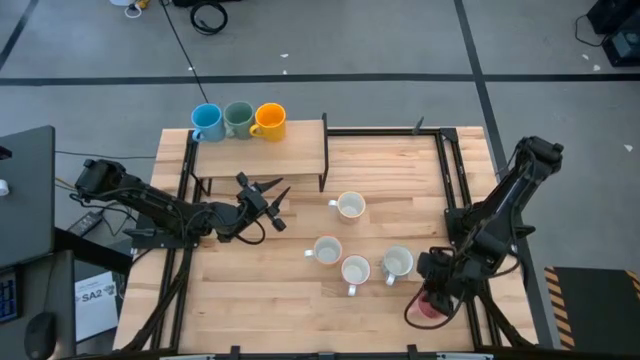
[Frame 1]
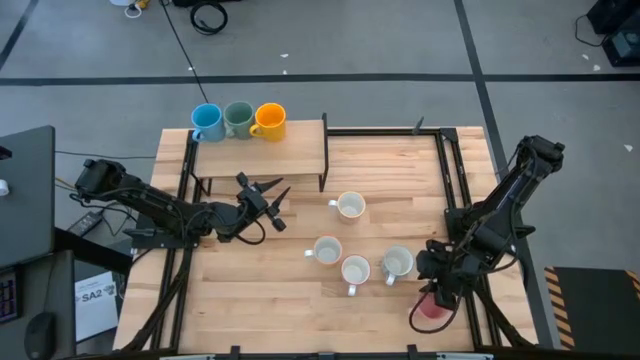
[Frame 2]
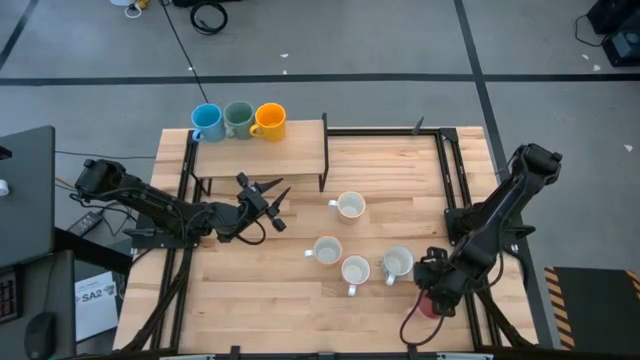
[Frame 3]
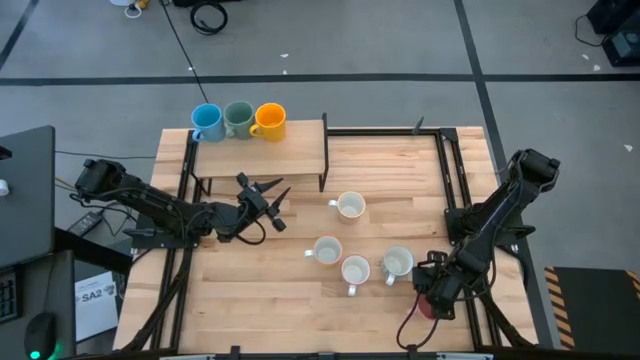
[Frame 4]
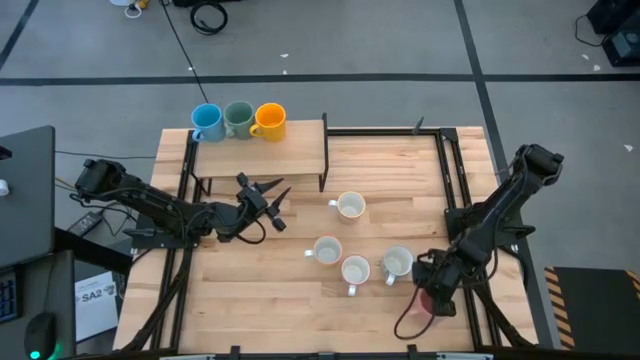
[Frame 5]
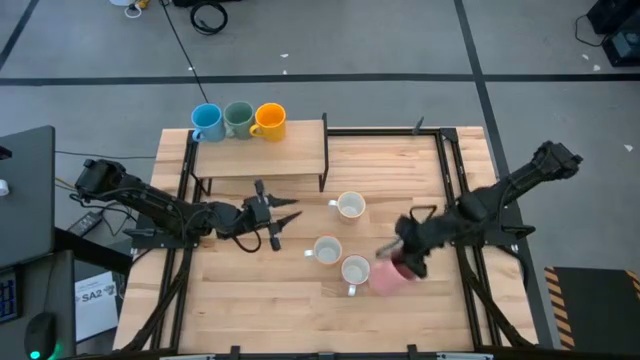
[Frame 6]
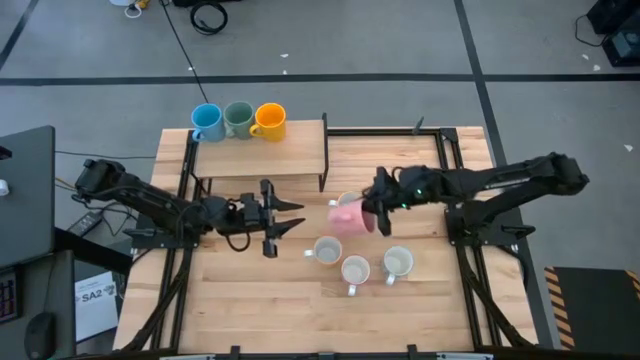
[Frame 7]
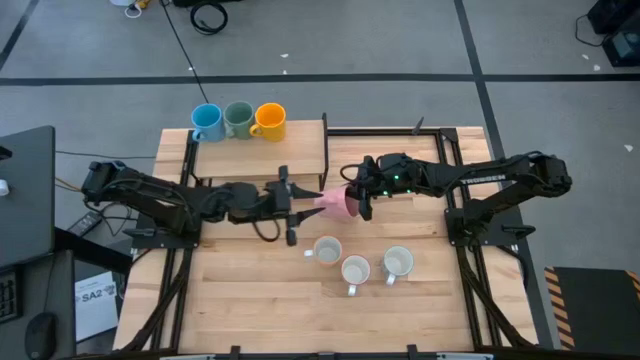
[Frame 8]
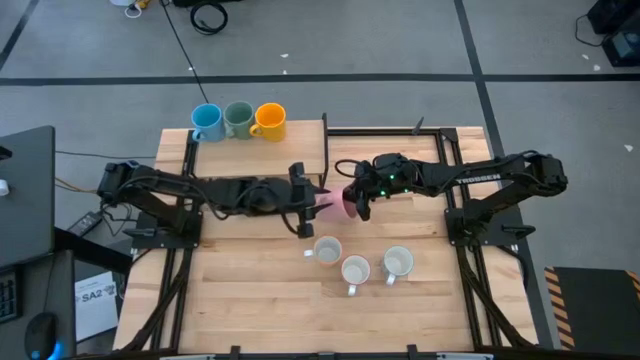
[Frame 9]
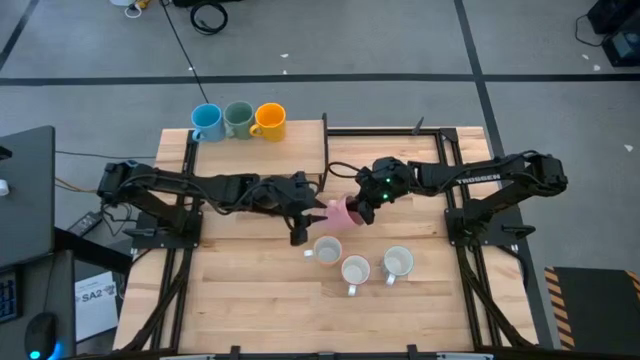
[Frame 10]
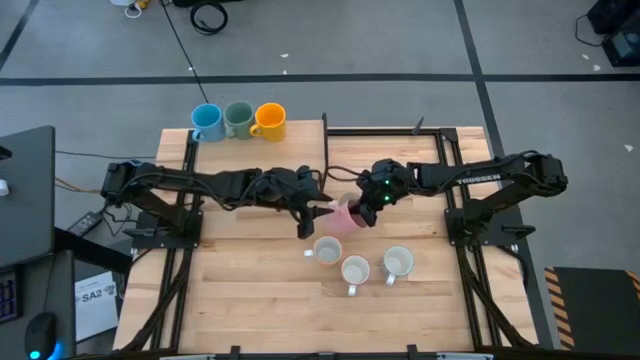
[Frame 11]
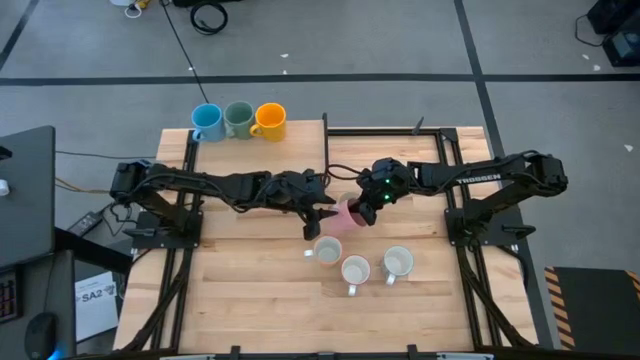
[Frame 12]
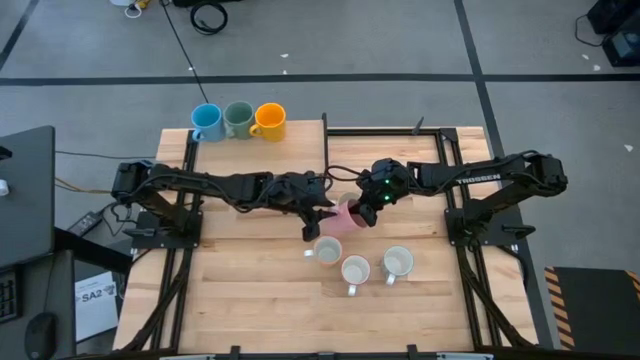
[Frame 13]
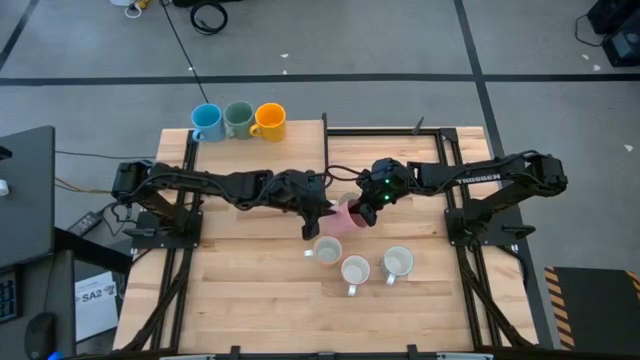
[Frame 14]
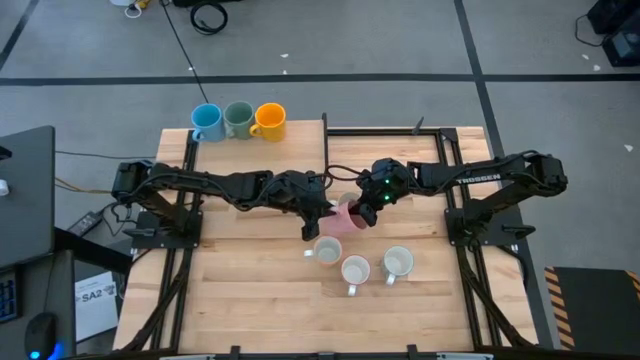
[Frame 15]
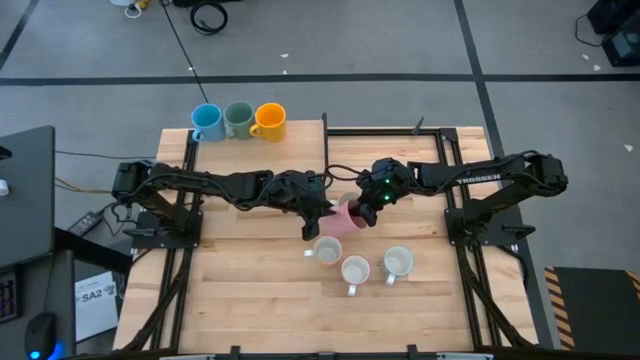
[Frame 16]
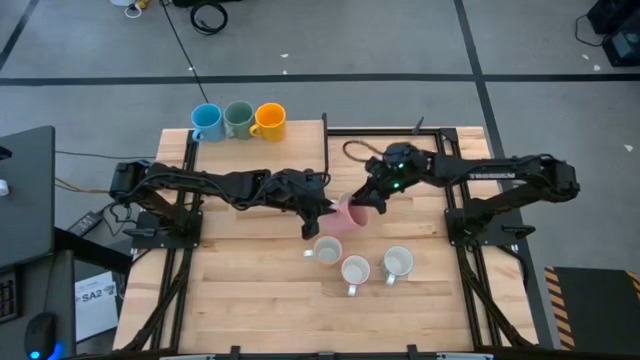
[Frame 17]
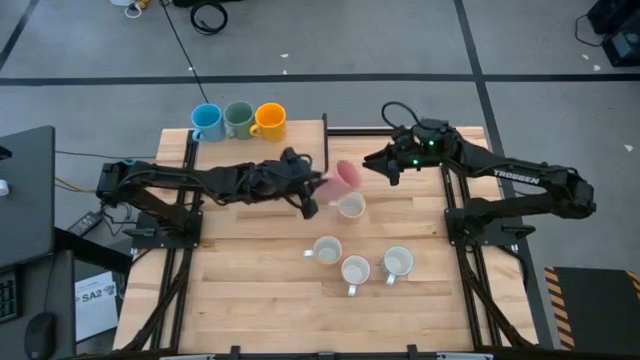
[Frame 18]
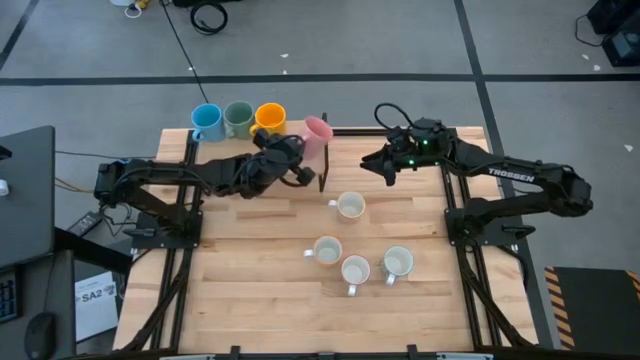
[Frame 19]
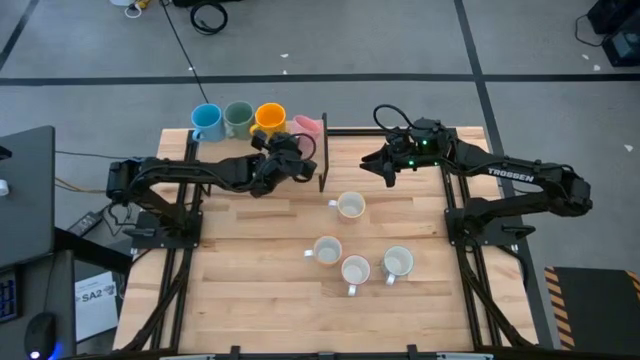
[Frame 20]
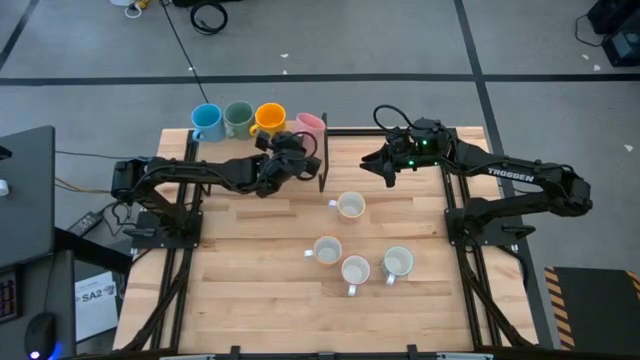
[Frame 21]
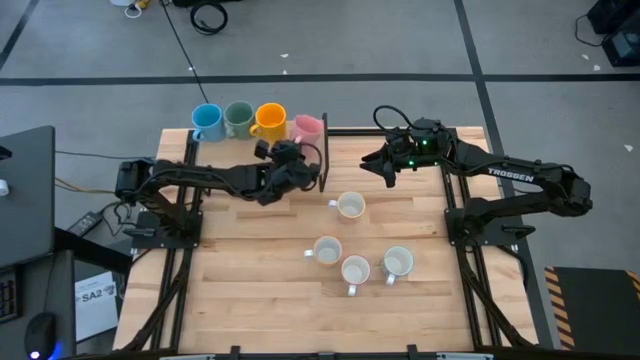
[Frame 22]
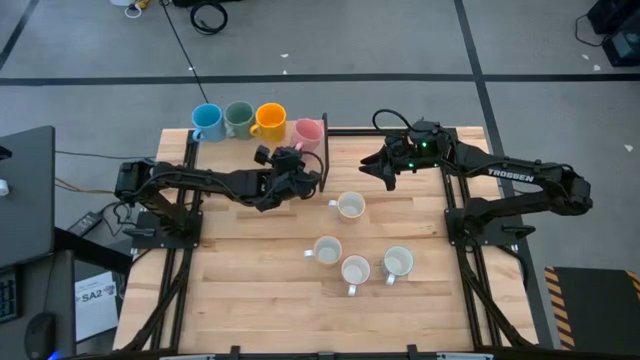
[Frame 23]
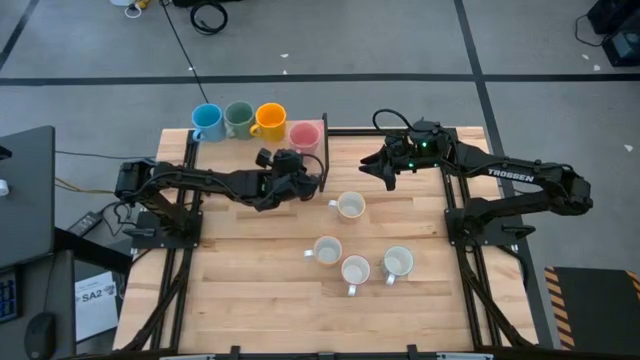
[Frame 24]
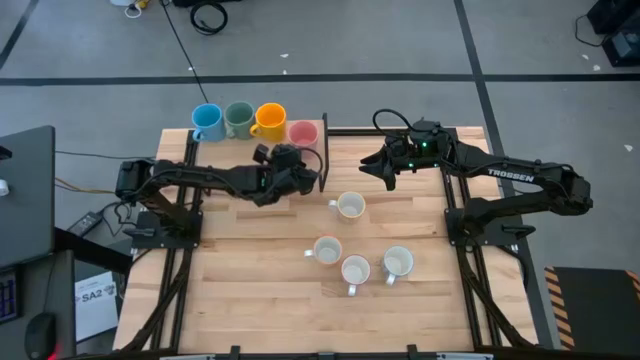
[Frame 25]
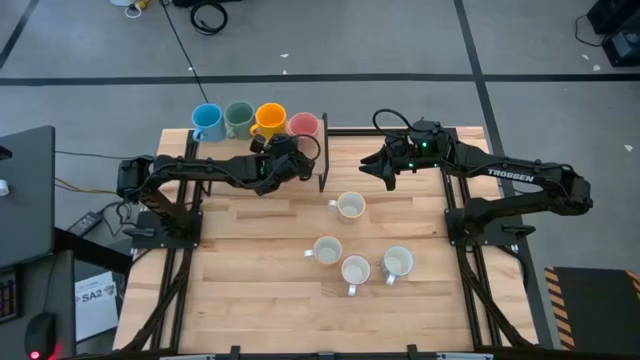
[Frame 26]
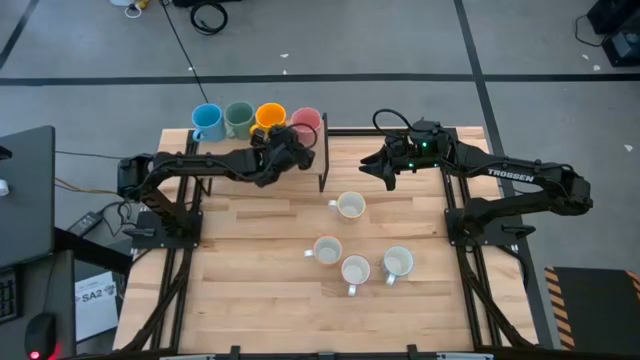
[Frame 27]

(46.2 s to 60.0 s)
Task: Place coffee mugs
Put the pink mug on the shelf

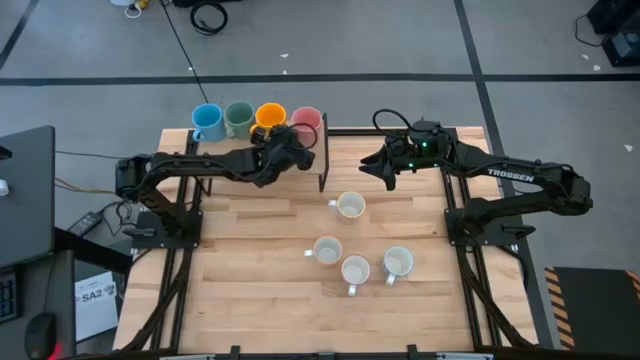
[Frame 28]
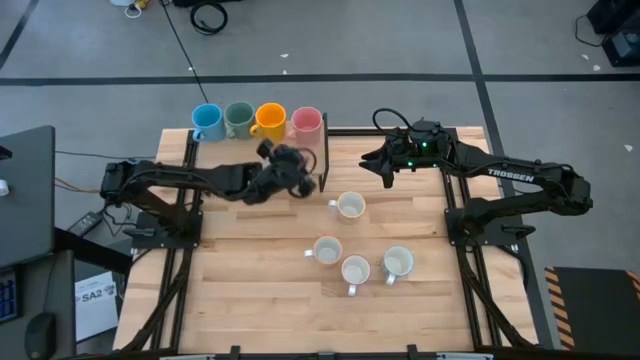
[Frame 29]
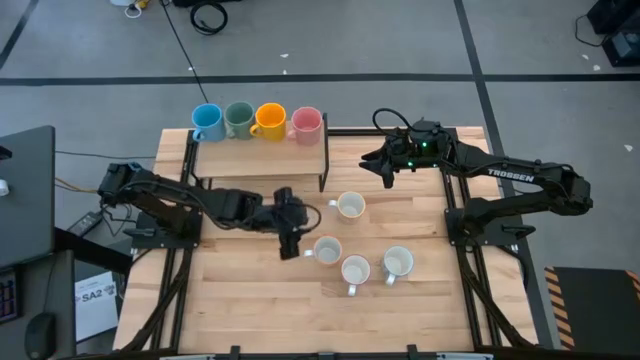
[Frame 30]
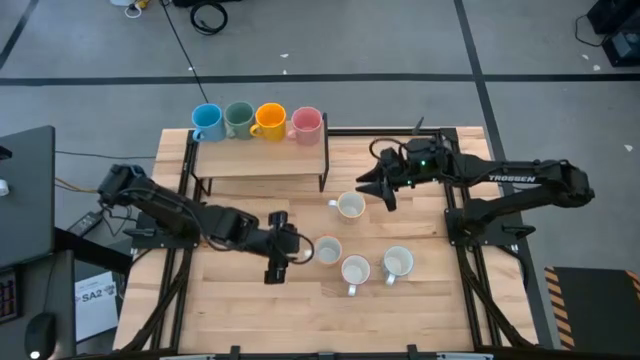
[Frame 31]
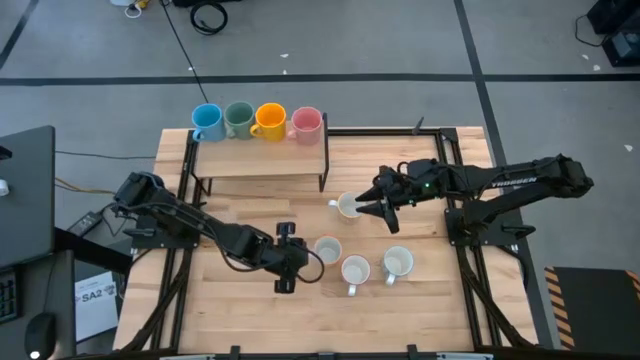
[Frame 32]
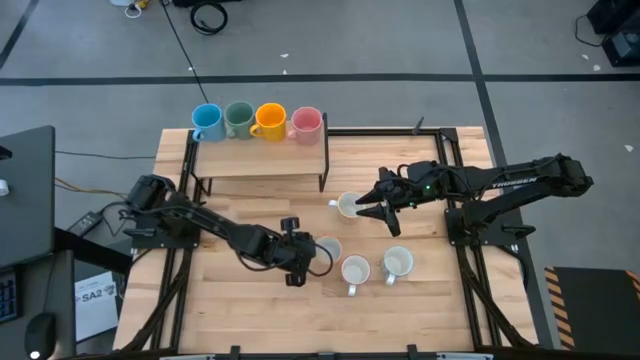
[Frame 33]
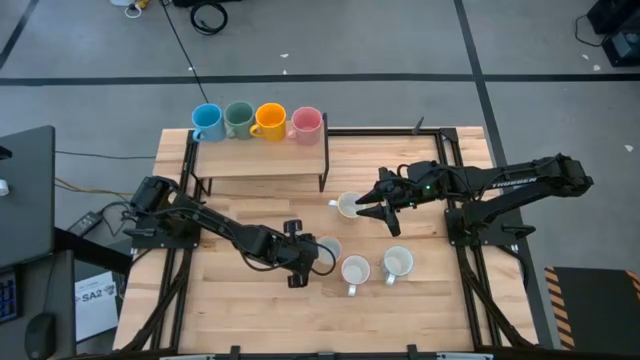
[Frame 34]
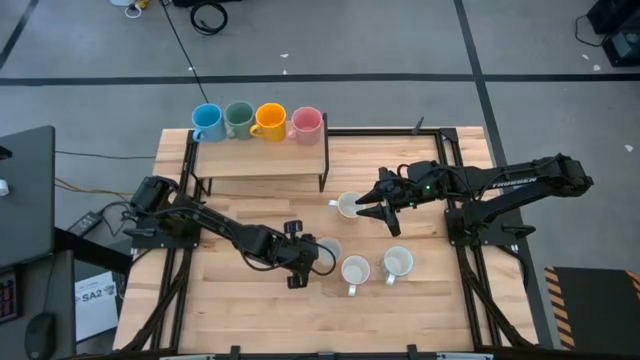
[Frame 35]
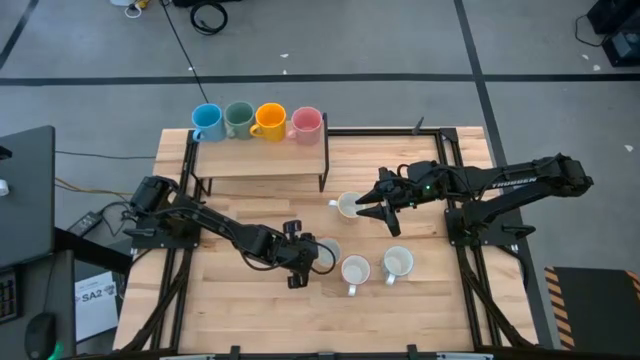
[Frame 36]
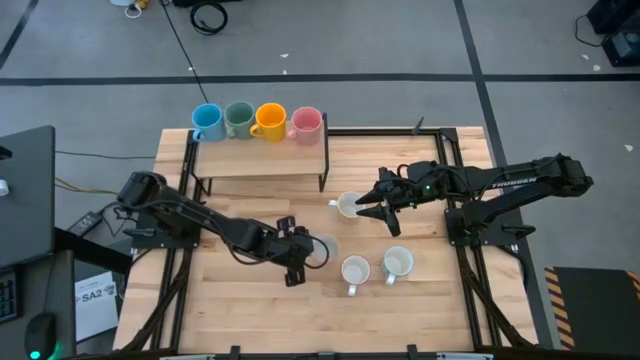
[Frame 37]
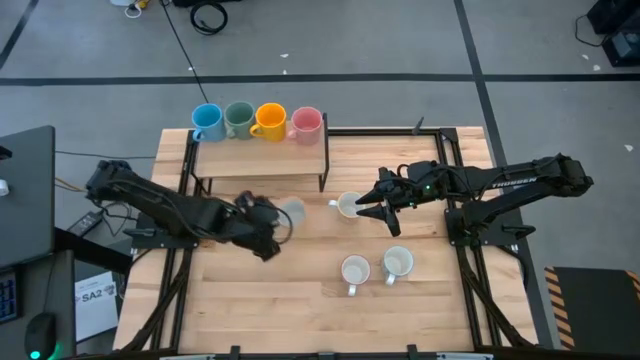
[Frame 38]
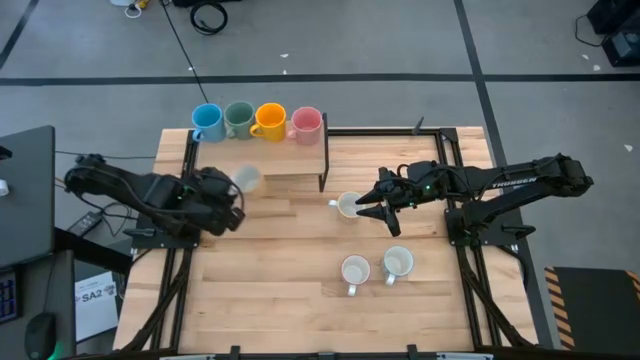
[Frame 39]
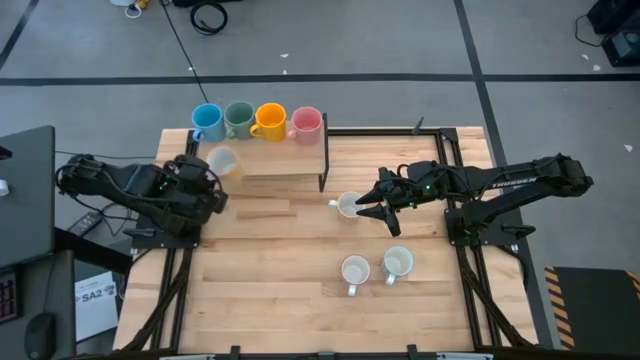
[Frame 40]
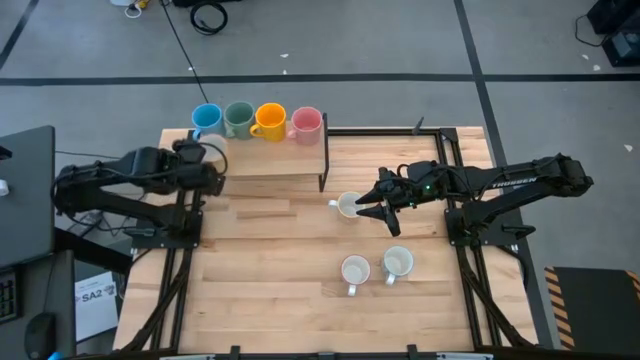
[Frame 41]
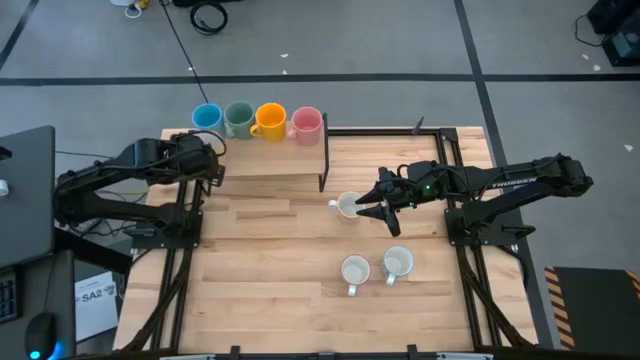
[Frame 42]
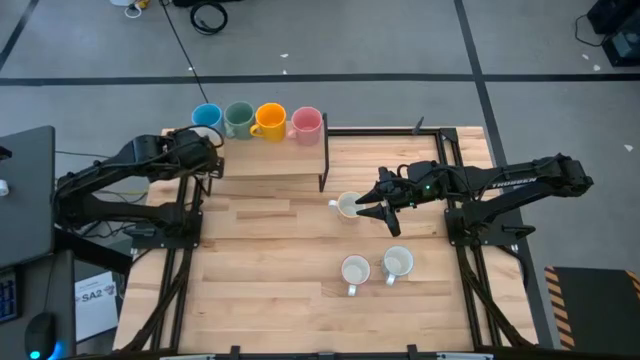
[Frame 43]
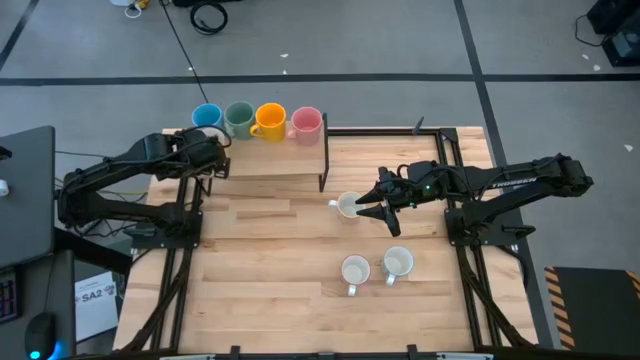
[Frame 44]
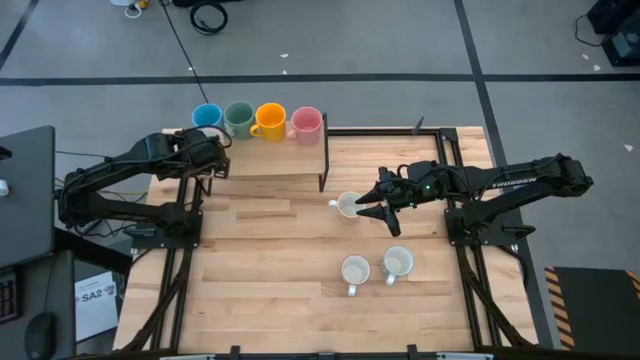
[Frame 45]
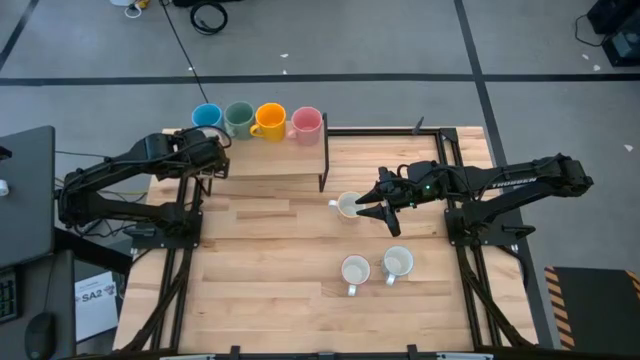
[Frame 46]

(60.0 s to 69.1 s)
Put the yellow patterned mug on the shelf
